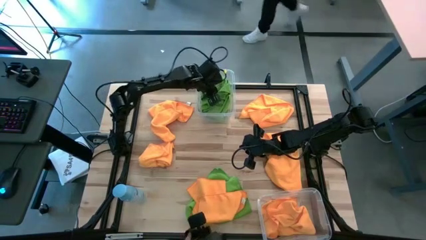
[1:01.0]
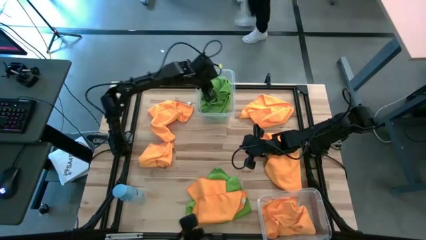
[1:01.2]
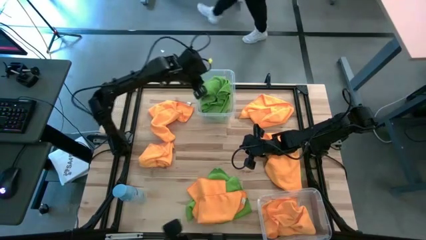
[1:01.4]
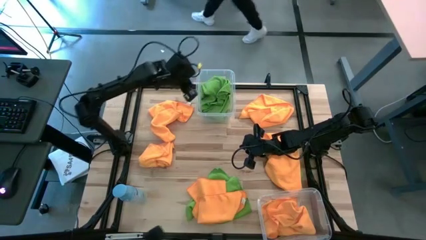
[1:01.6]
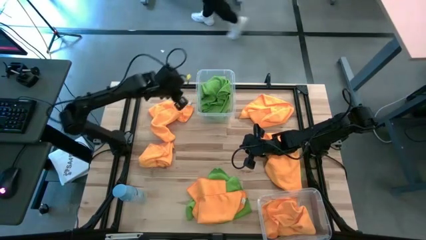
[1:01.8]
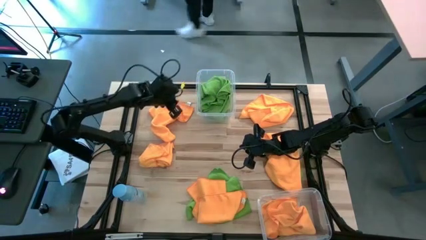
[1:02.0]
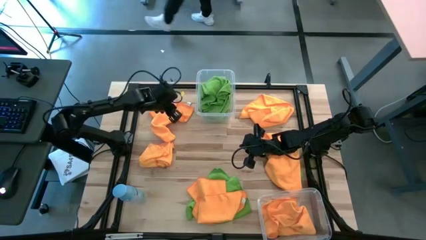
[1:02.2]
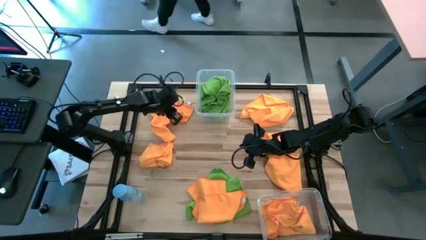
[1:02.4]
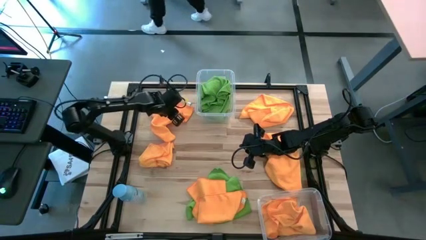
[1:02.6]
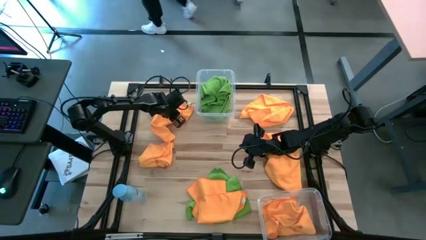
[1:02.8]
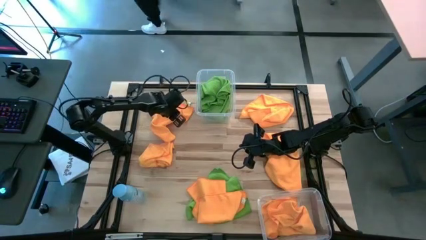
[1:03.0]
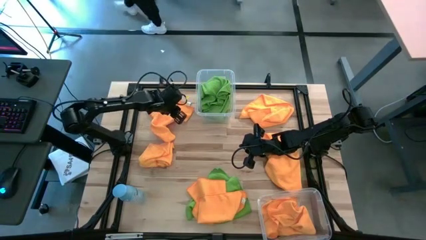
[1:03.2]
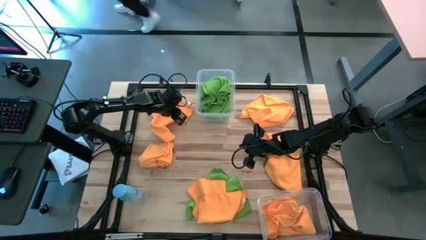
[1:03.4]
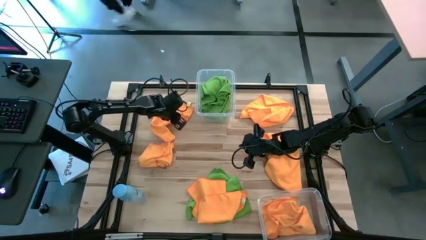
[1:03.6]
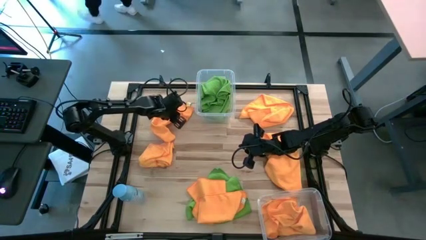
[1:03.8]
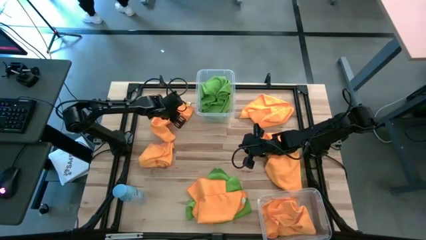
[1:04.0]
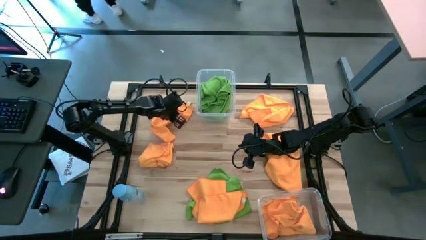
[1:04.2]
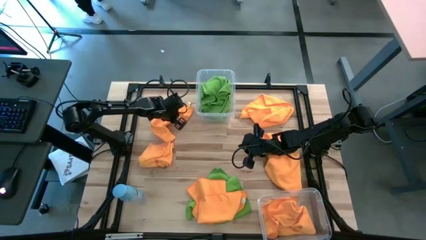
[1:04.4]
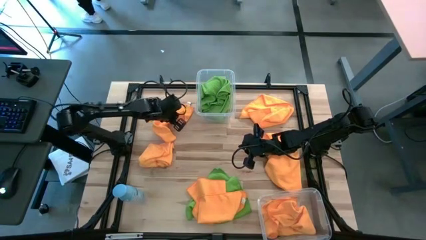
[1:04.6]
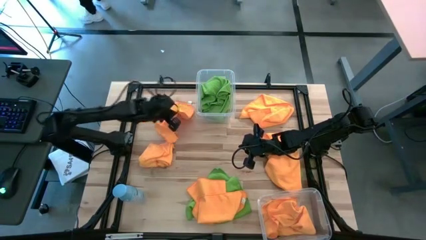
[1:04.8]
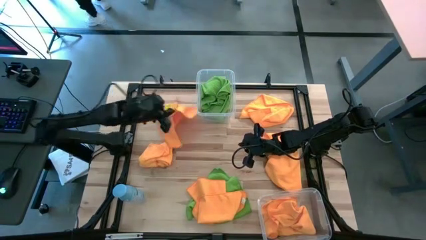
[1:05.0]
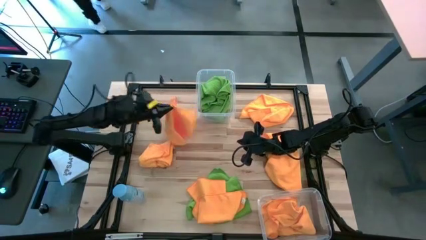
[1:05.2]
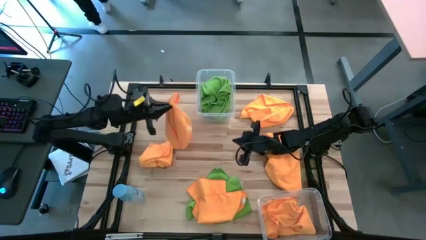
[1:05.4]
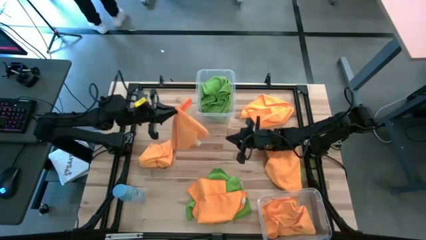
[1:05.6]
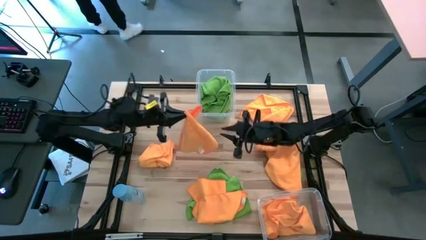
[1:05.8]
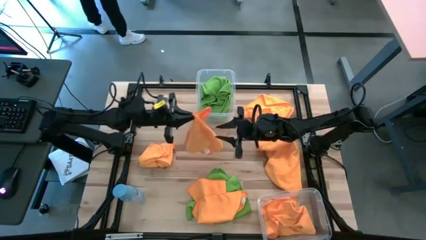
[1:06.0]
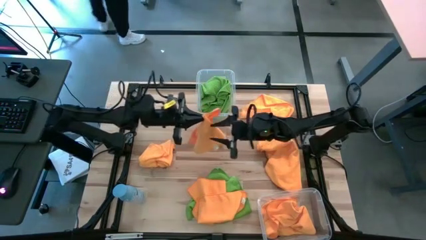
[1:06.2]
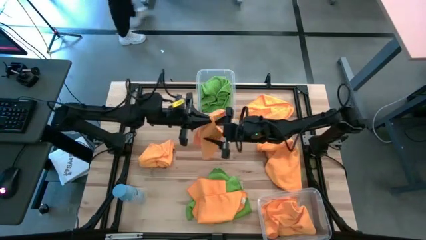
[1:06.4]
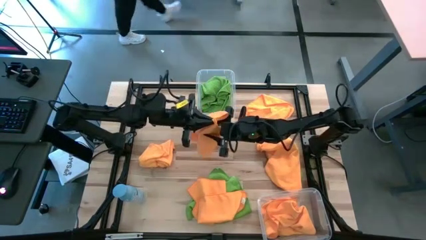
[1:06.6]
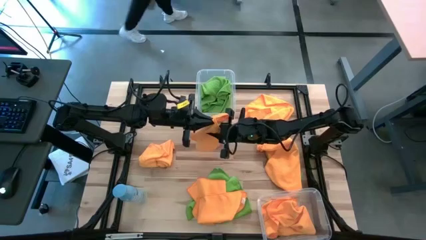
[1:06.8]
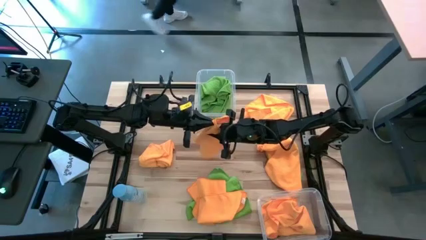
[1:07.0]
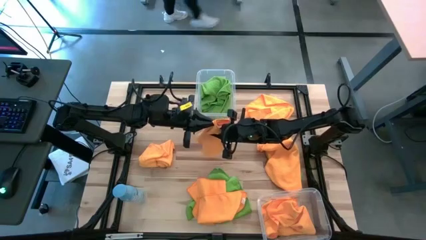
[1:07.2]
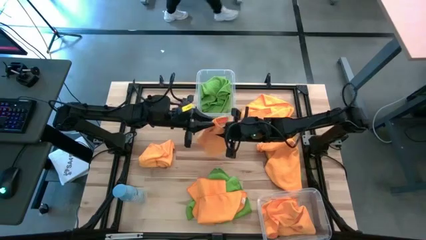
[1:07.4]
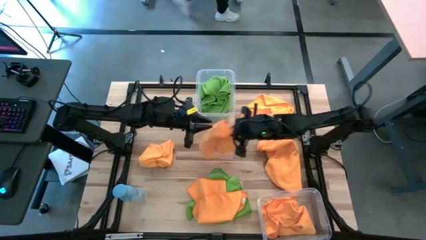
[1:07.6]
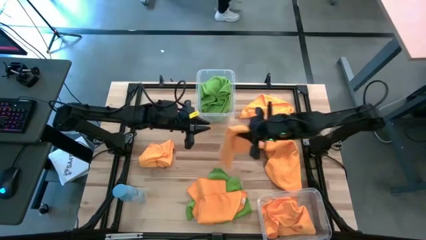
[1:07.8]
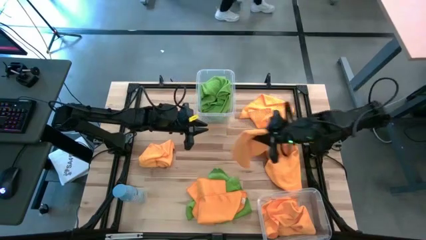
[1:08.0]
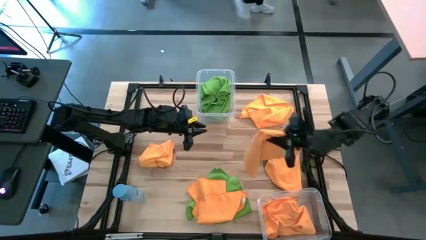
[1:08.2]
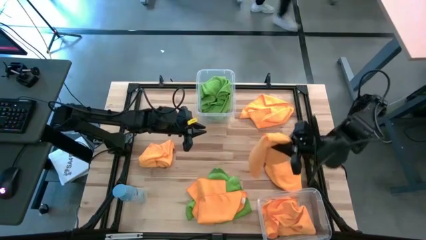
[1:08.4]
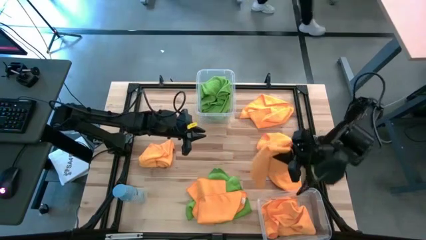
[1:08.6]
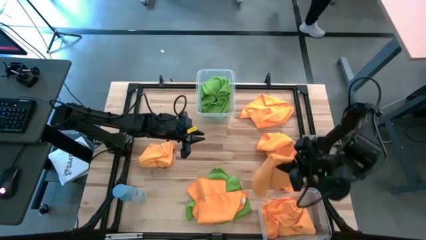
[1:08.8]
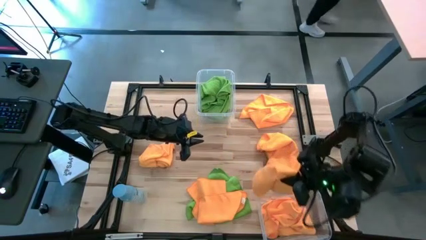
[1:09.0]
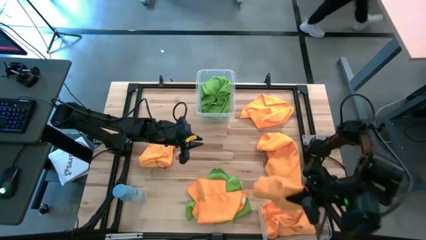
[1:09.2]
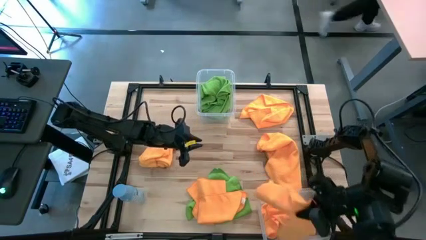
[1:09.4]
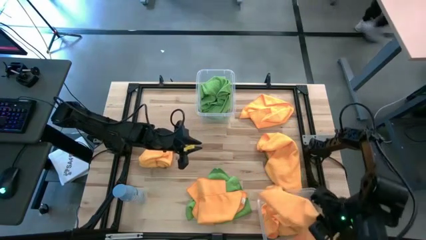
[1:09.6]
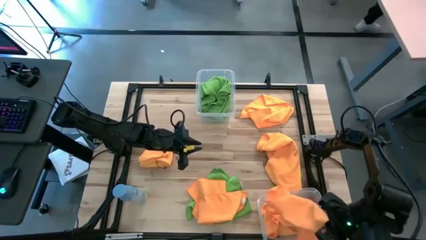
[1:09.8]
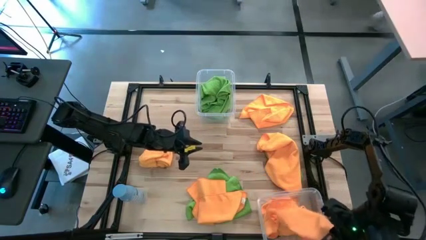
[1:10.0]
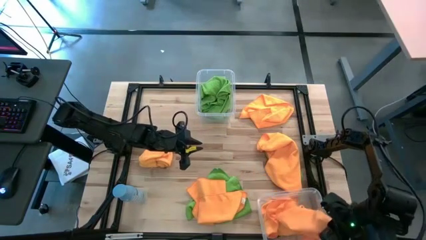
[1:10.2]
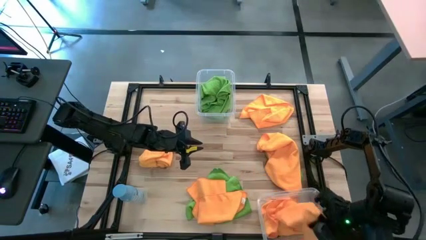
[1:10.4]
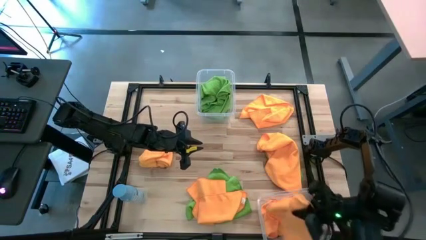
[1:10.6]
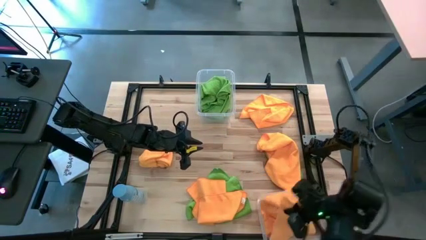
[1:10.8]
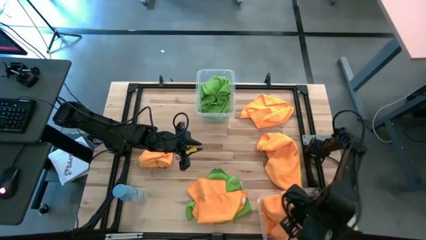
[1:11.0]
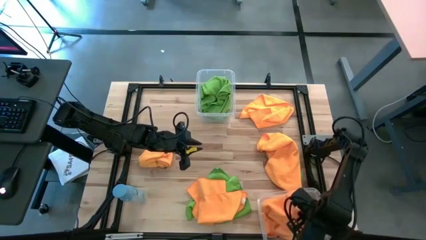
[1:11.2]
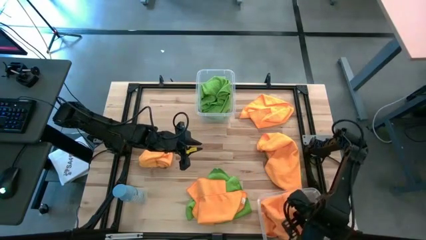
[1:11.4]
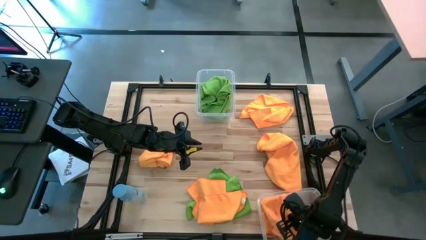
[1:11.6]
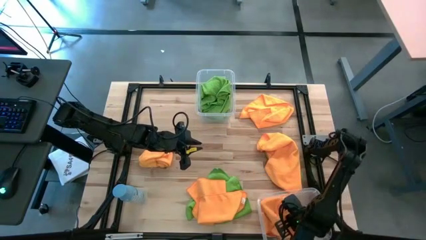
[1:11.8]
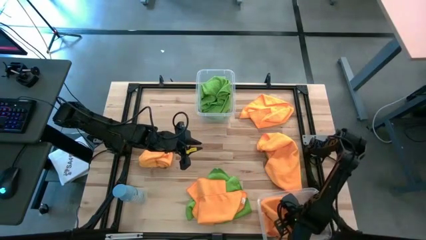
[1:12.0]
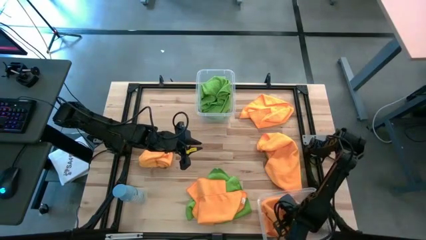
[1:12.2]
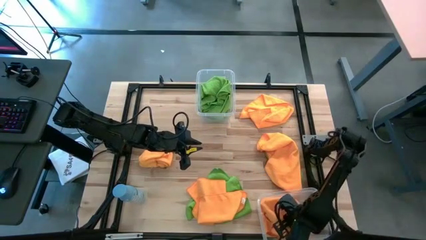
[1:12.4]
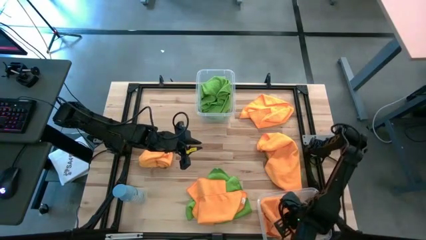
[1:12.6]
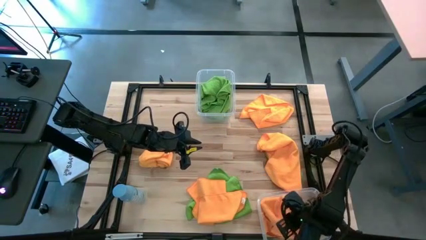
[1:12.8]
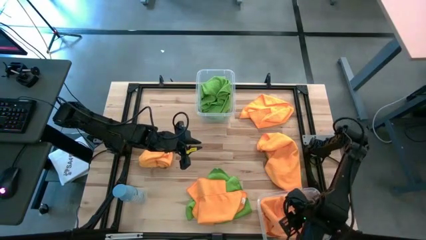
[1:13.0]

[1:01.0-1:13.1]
Task: Sort microfiber towel by color & place in baskets
Put the orange microfiber towel into the bottom transparent bin

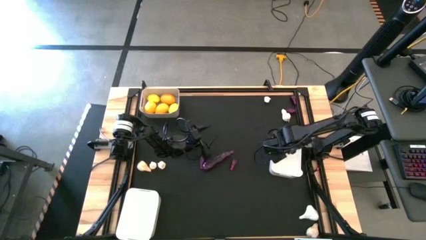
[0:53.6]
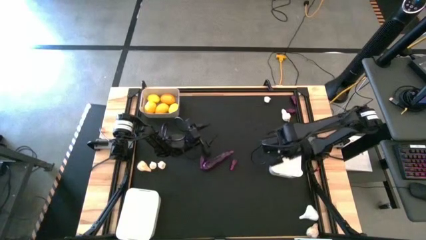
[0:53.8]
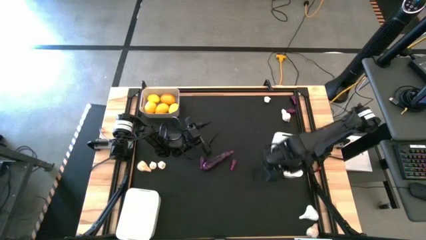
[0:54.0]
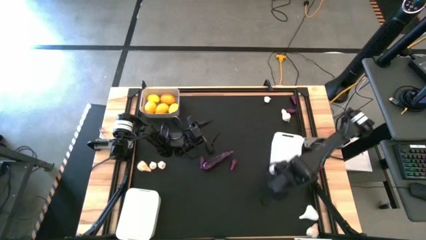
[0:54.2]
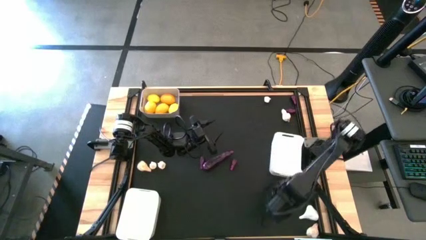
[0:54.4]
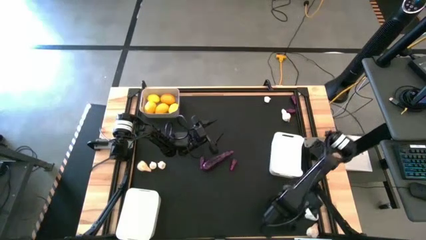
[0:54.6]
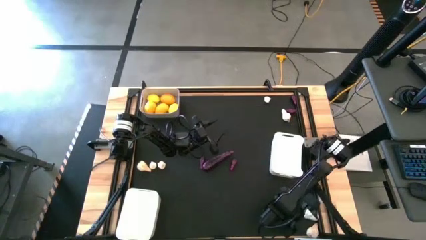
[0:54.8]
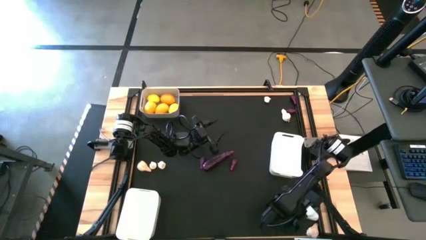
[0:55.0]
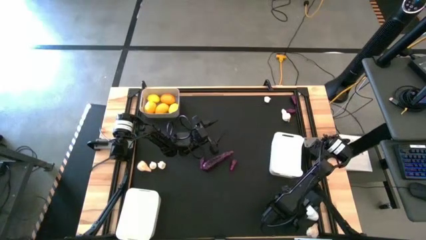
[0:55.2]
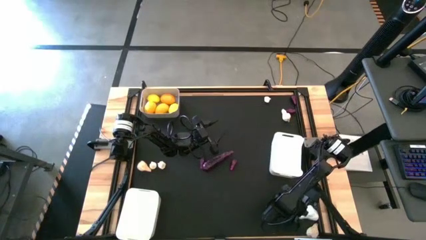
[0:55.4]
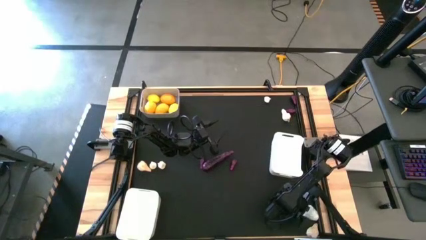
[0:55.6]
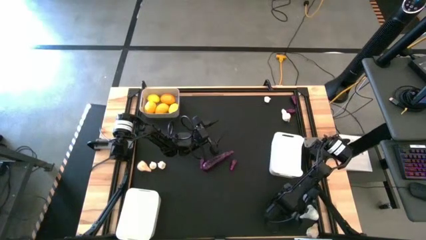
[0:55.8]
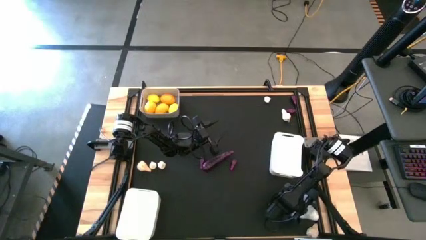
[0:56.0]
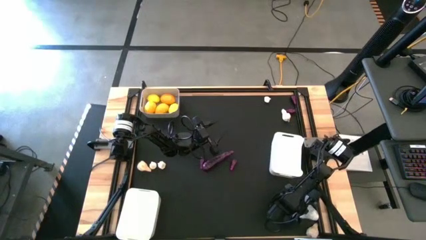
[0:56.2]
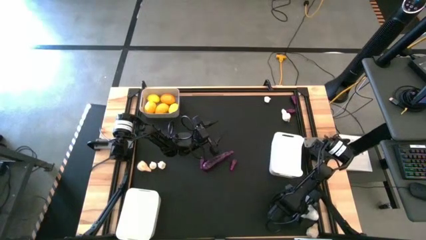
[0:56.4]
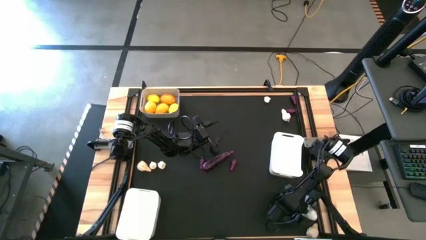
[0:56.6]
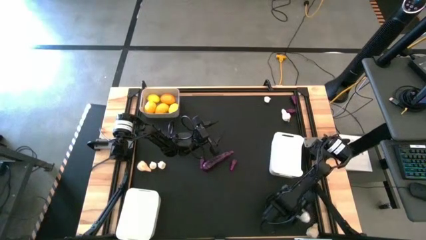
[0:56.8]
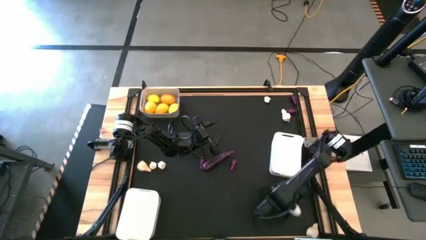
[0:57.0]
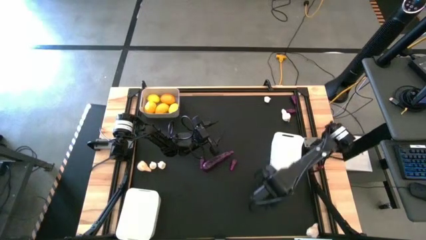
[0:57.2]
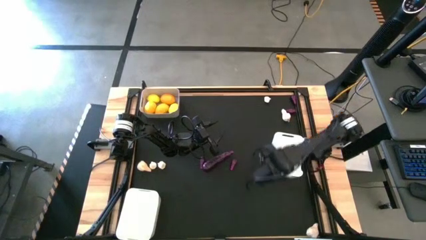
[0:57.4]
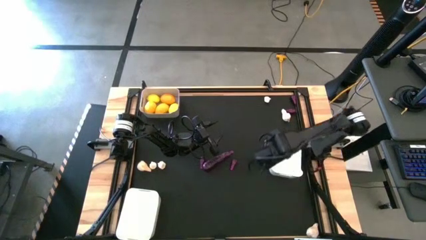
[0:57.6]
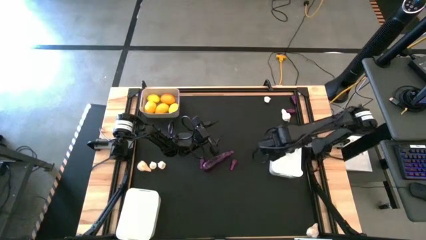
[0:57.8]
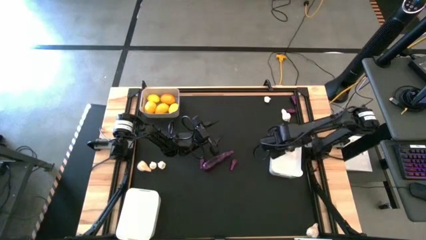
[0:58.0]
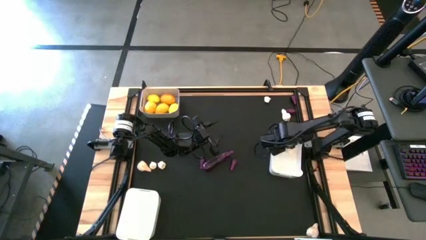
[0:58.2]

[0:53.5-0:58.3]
Task: Sort produce into baskets
Put the middle right garlic into the middle right white bin
